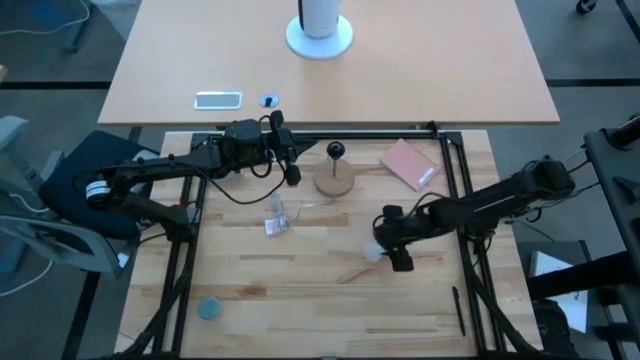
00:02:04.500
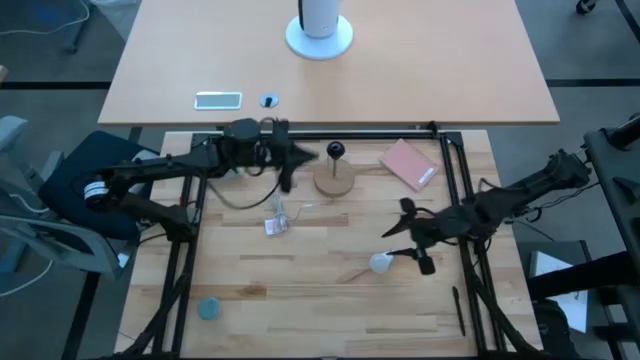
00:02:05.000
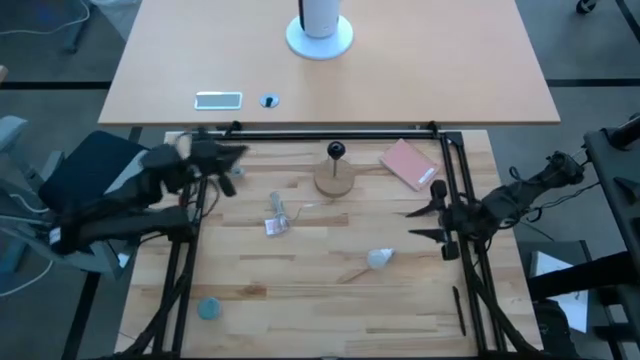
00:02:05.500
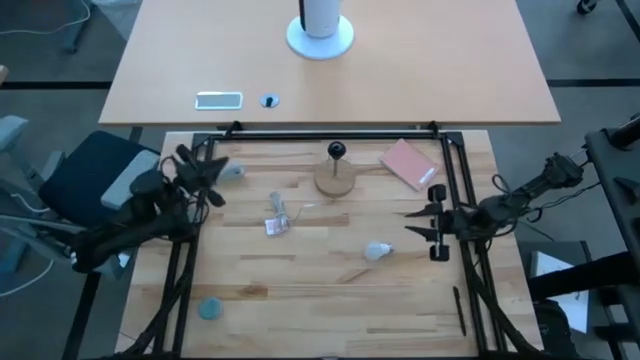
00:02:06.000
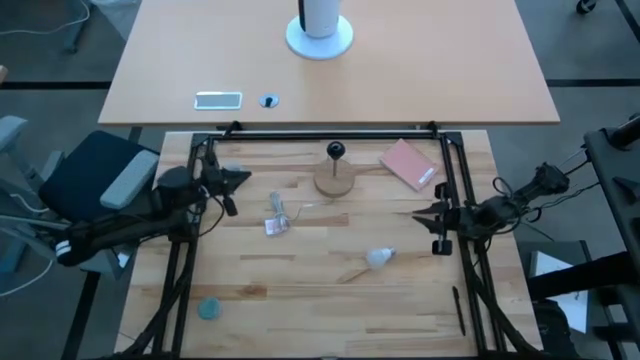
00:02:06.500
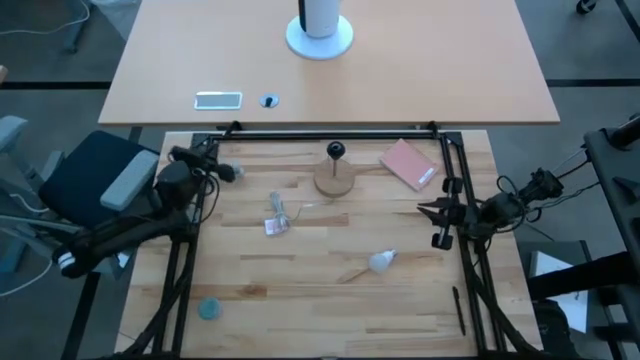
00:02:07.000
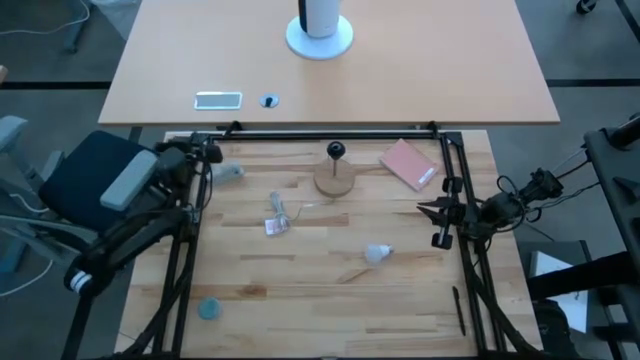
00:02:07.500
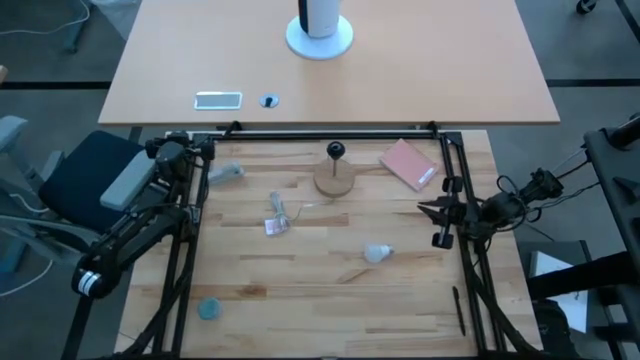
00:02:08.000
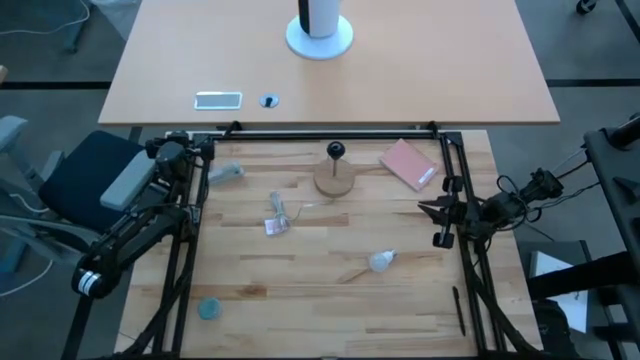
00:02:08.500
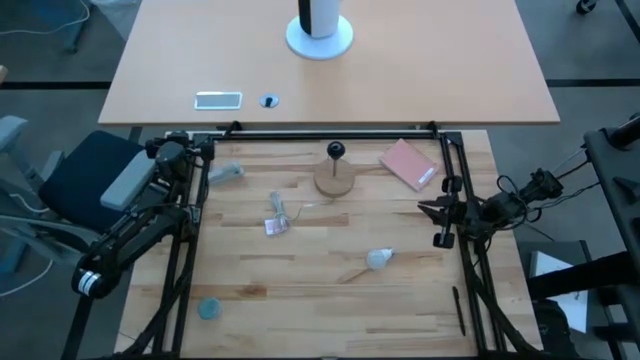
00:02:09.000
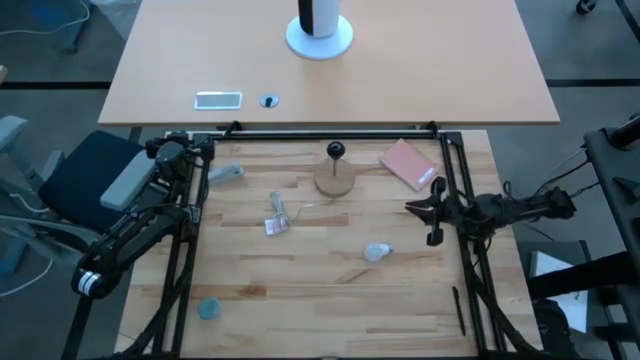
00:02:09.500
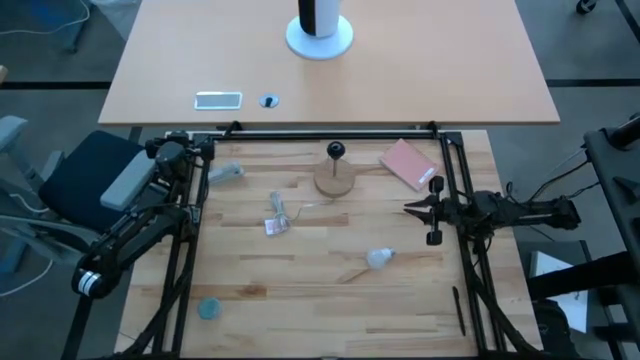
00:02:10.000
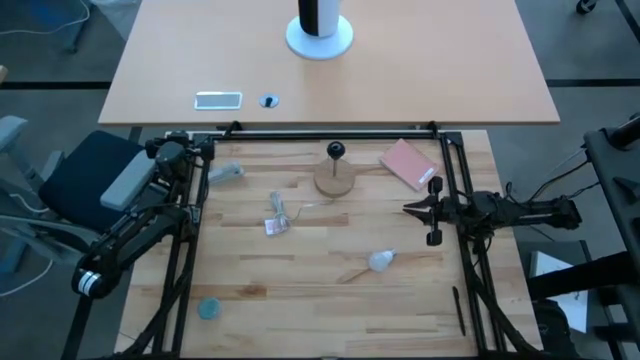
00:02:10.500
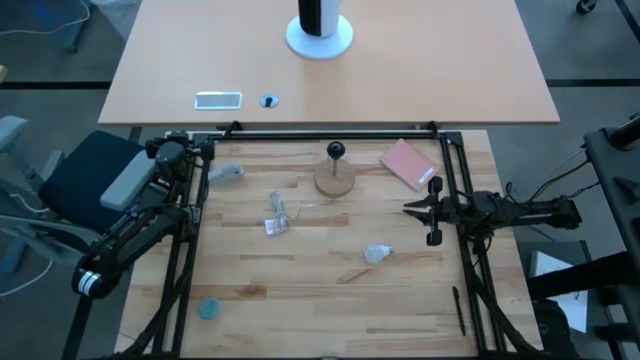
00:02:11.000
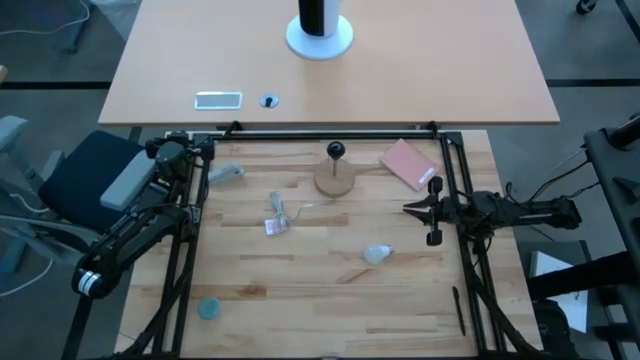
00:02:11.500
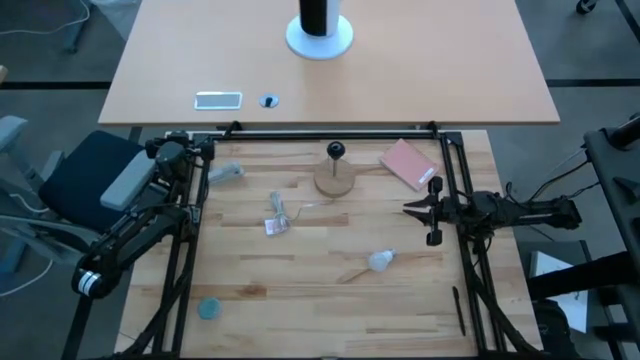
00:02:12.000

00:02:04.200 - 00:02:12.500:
Task: Screw lightbulb
Return to Home Position

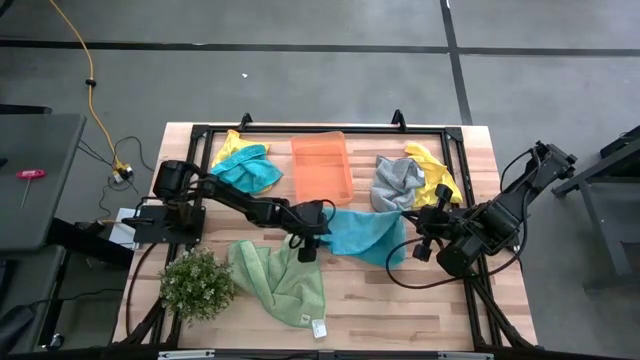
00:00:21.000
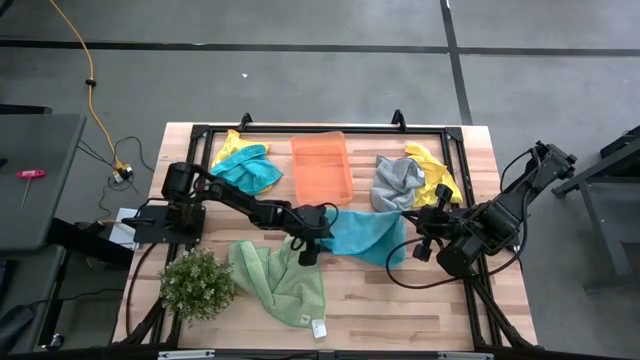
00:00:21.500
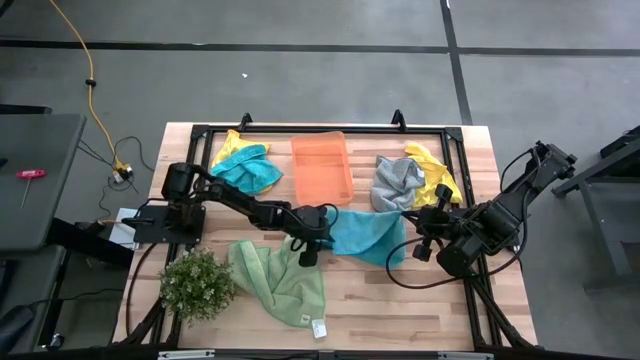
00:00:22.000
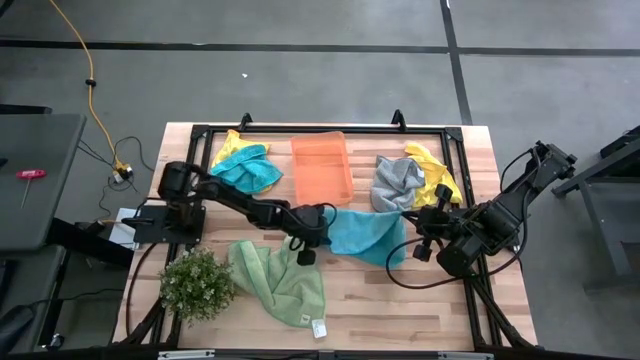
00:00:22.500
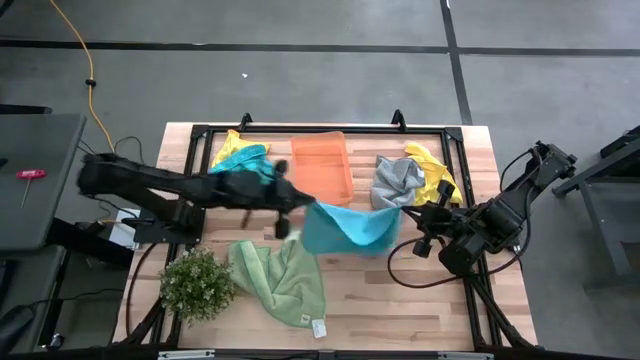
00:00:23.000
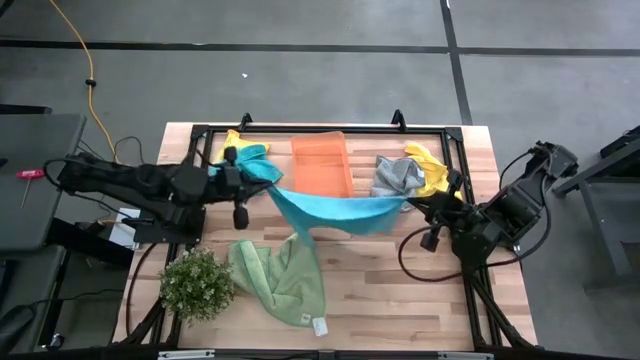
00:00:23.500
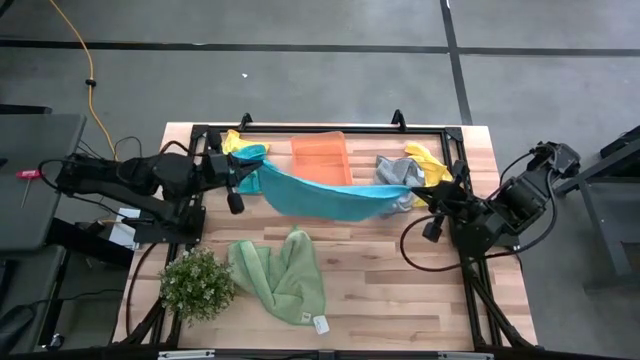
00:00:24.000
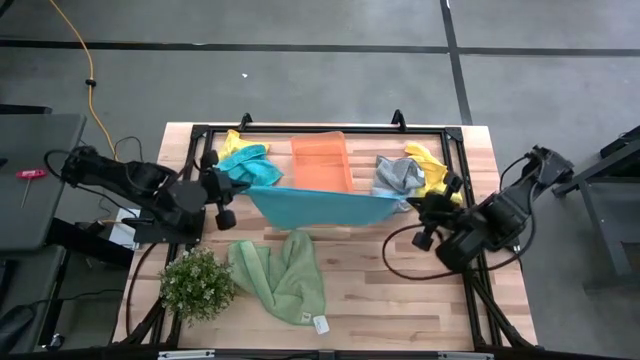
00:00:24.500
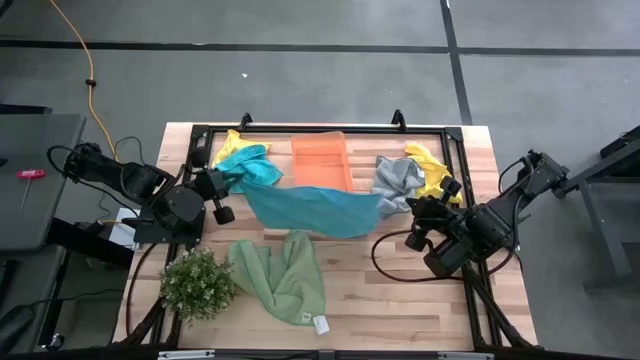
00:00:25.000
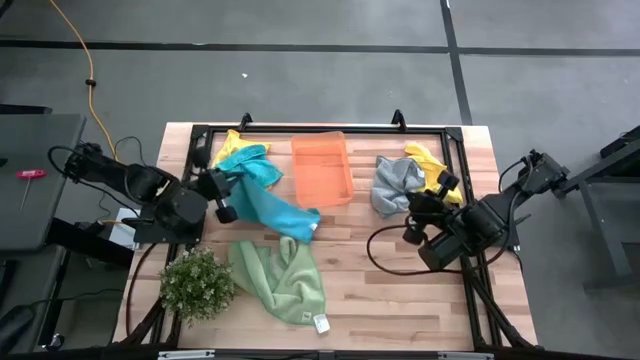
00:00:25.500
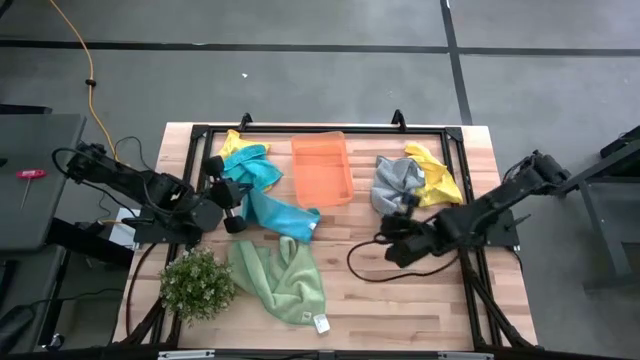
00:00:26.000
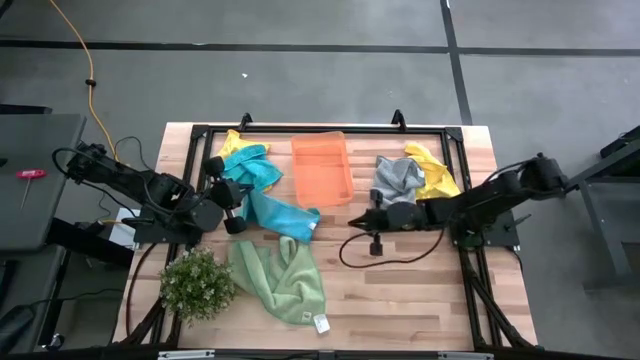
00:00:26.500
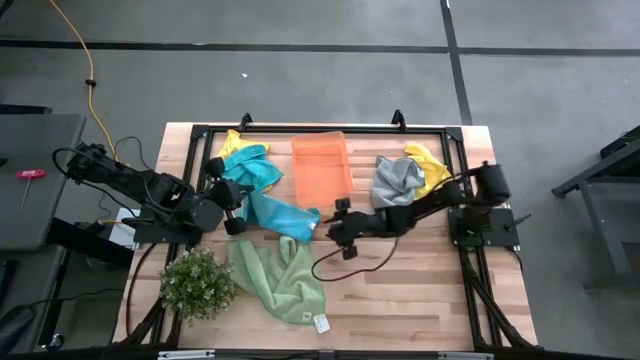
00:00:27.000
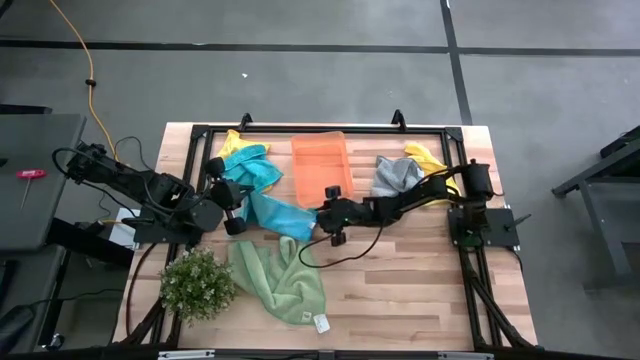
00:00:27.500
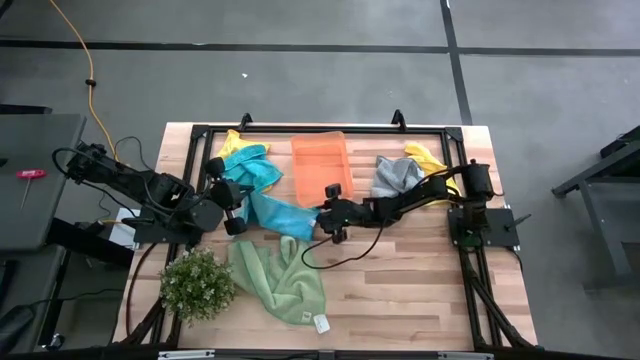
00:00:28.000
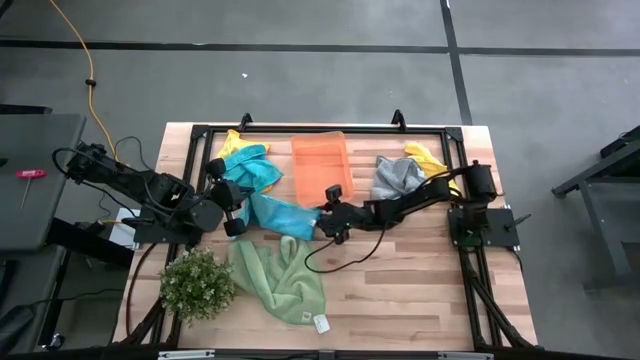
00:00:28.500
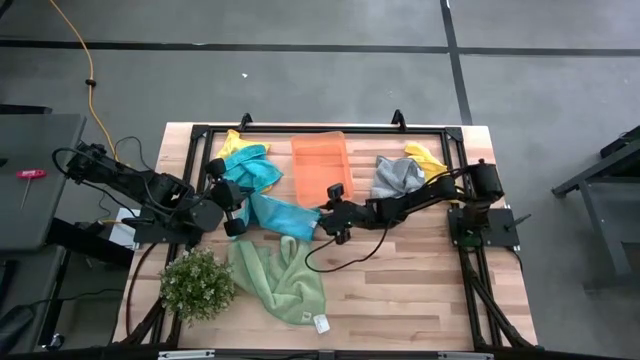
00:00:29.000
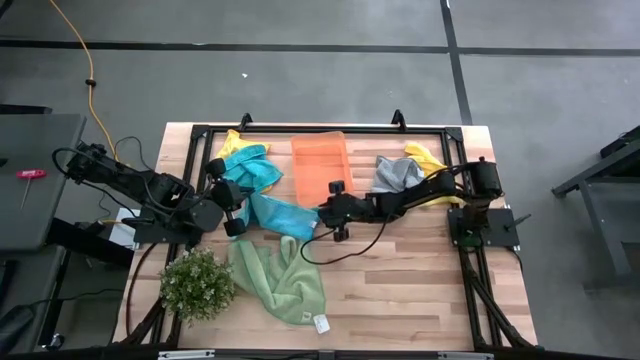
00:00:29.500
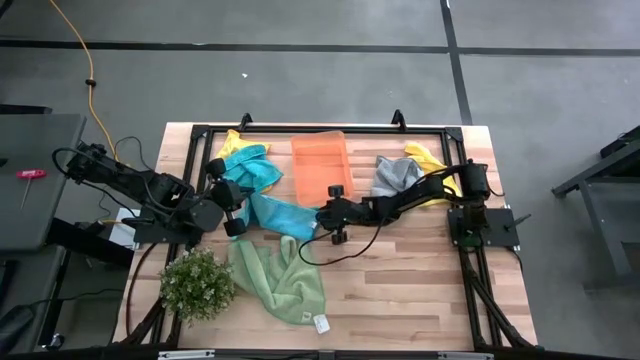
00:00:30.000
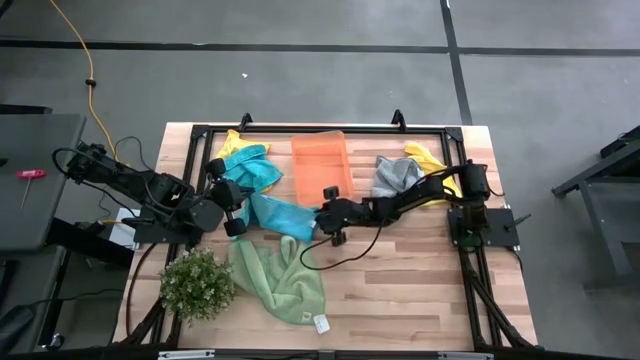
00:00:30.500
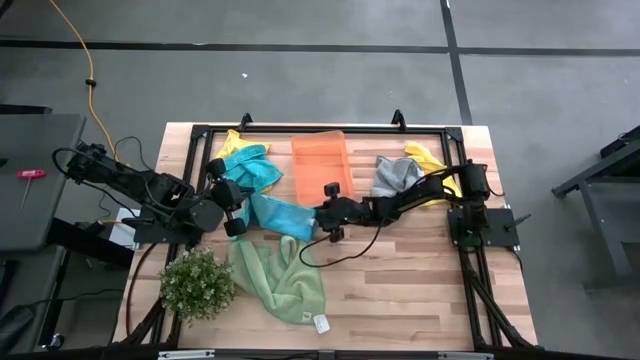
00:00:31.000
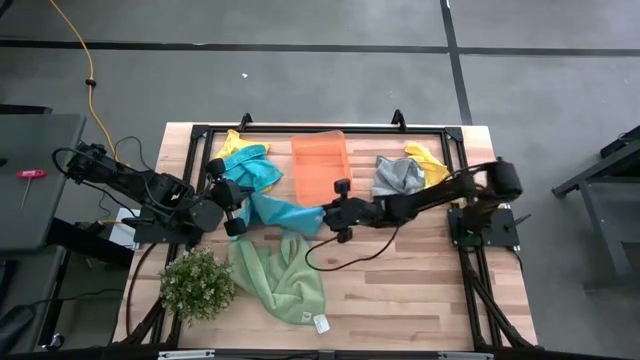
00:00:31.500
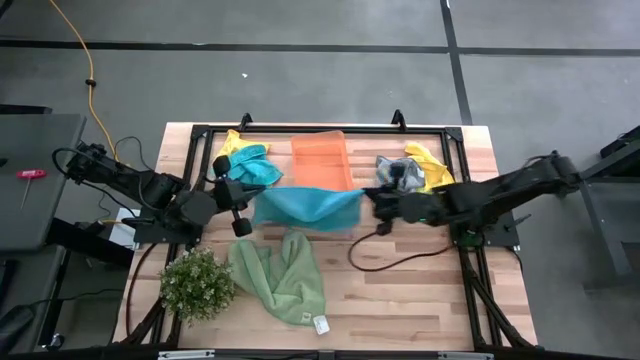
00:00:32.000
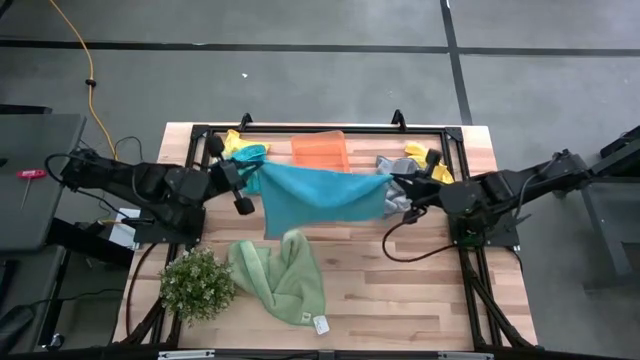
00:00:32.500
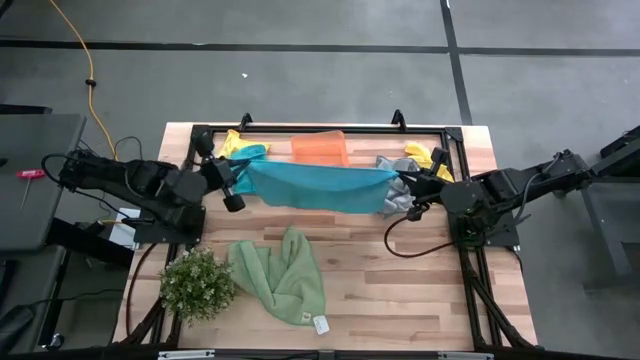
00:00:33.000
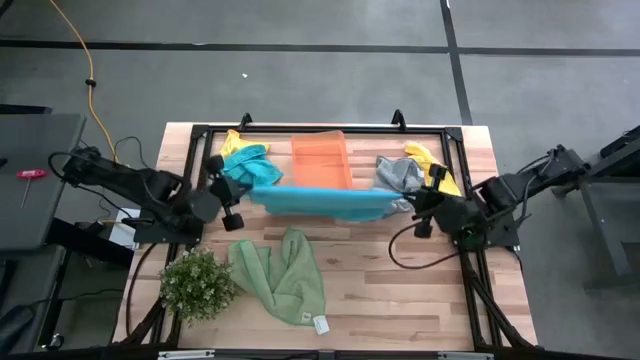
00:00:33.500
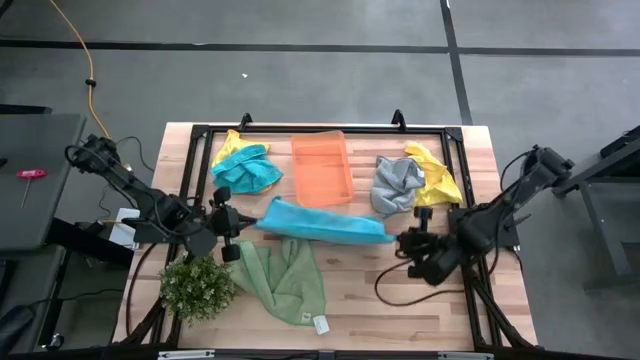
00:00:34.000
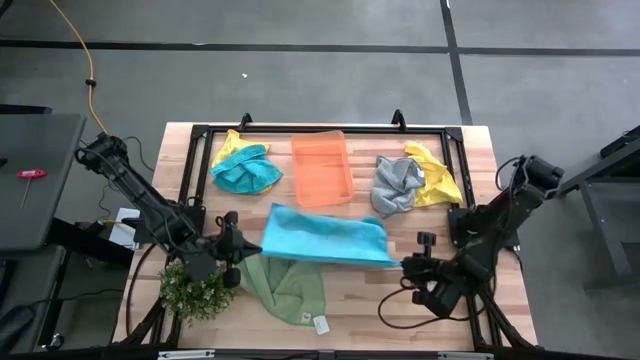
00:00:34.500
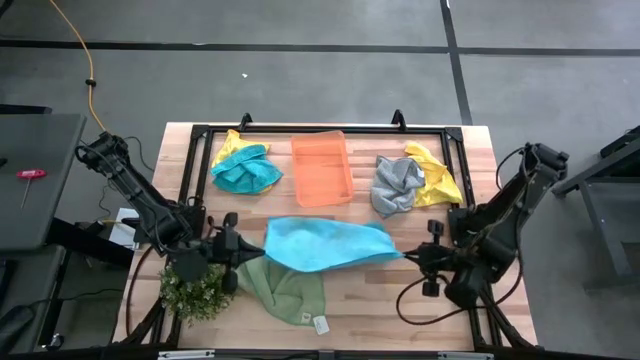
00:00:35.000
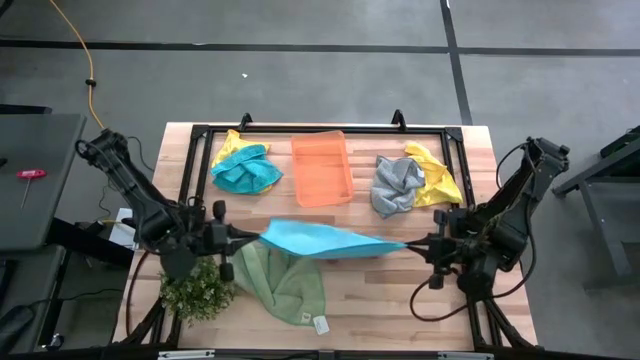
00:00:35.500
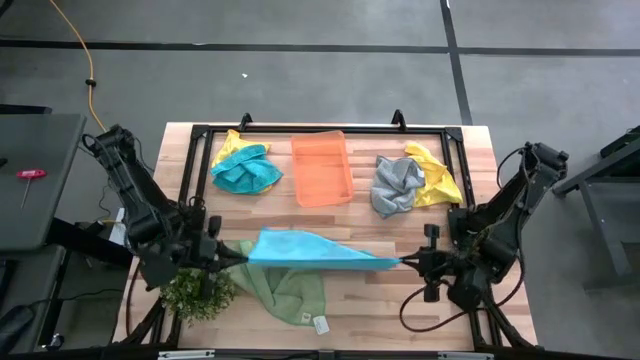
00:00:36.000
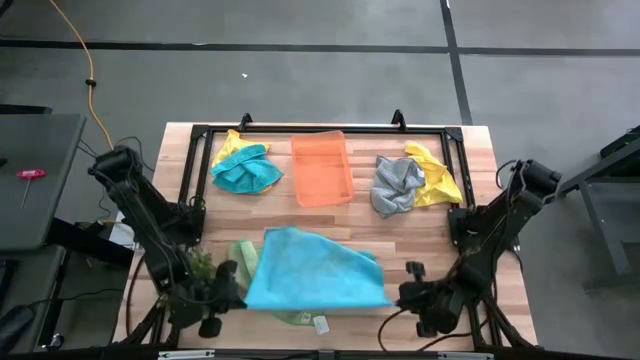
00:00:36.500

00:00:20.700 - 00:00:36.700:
Task: Fold microfiber towels
Fold the bottom blue microfiber cloth
